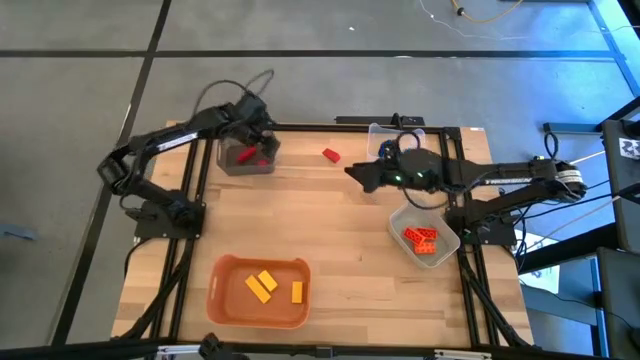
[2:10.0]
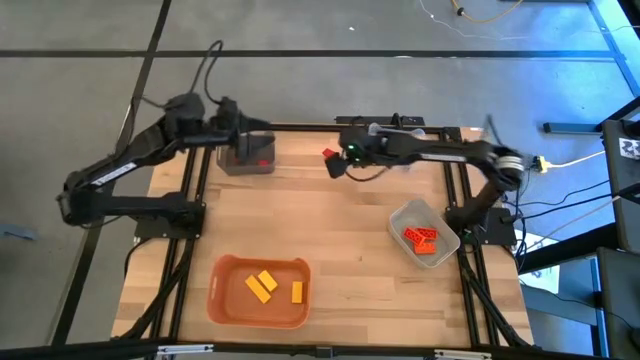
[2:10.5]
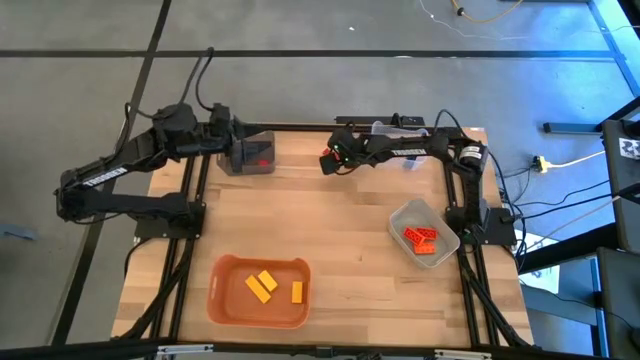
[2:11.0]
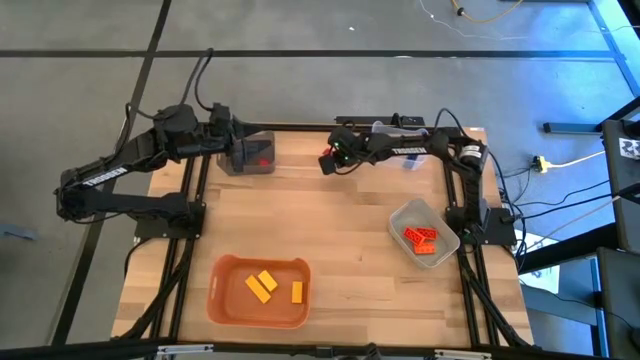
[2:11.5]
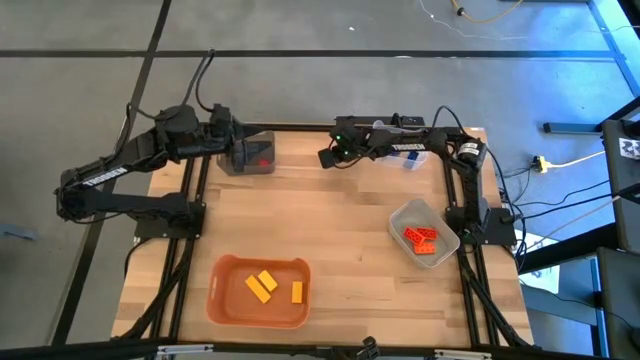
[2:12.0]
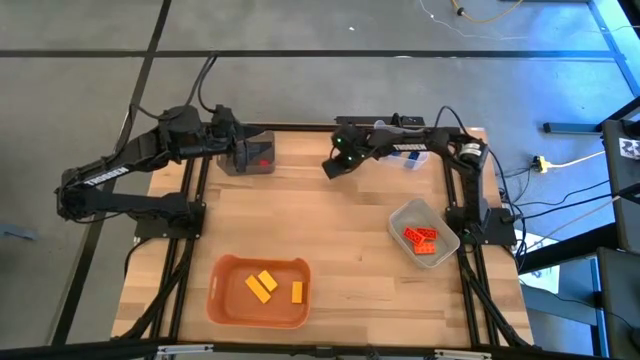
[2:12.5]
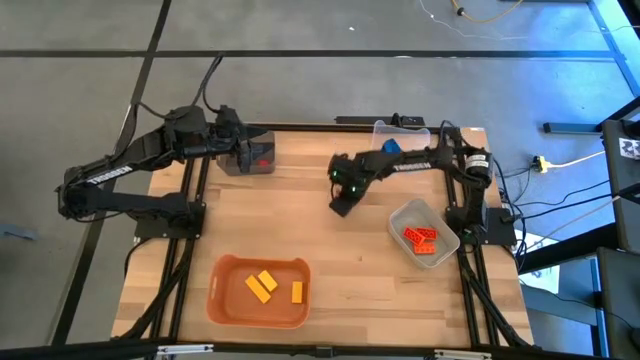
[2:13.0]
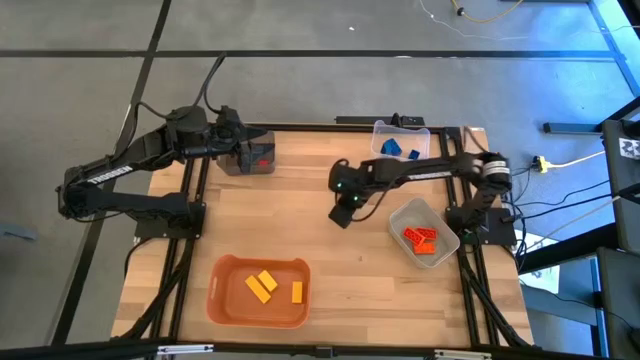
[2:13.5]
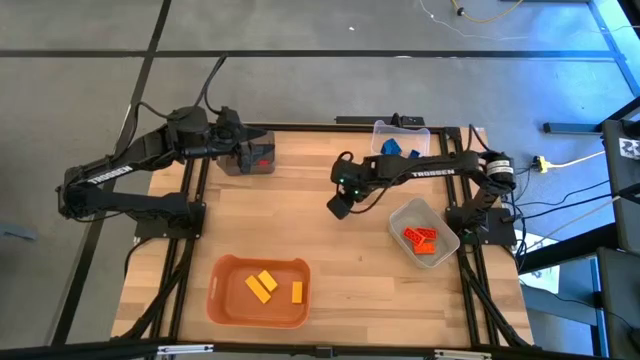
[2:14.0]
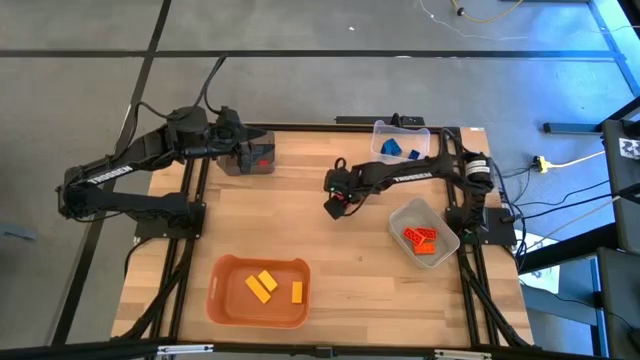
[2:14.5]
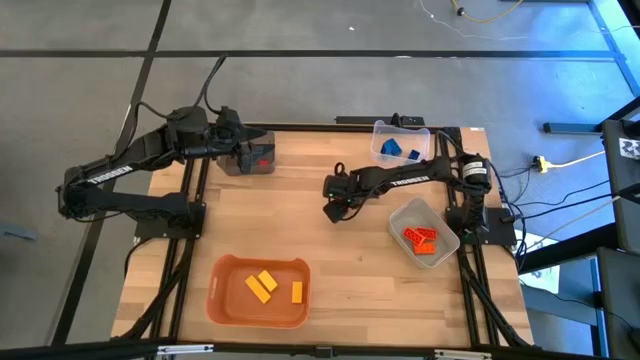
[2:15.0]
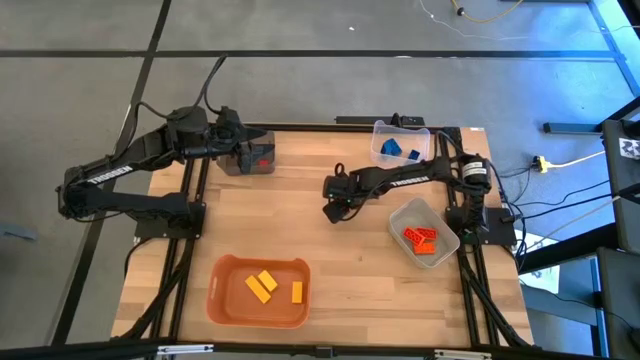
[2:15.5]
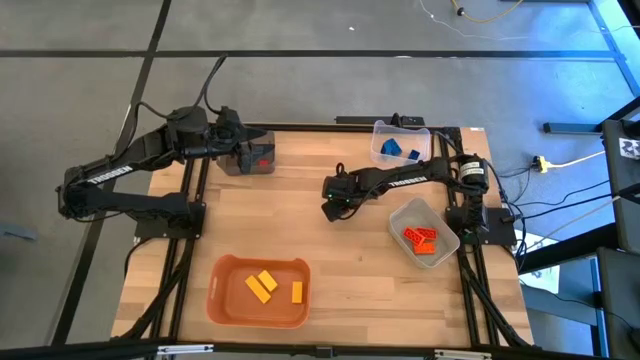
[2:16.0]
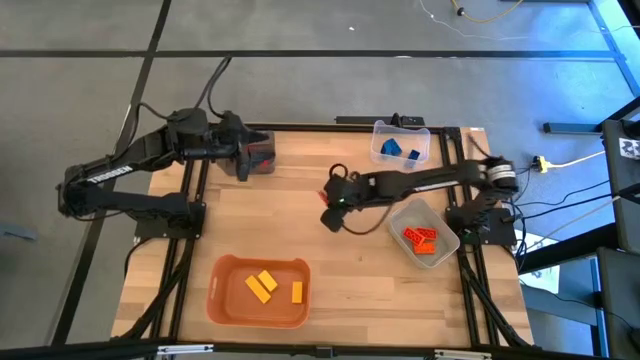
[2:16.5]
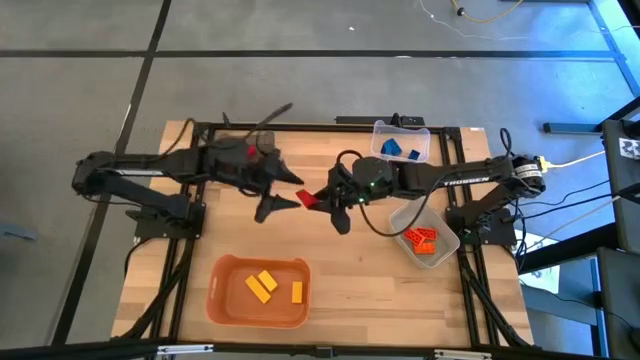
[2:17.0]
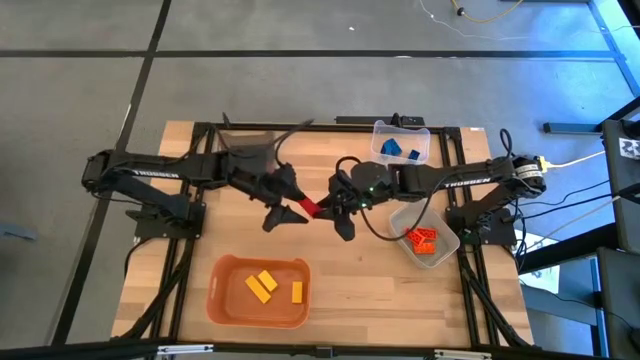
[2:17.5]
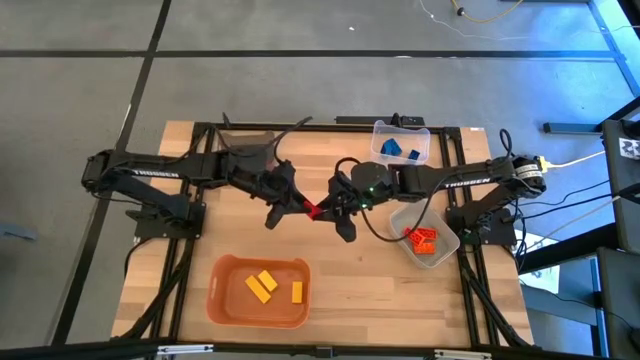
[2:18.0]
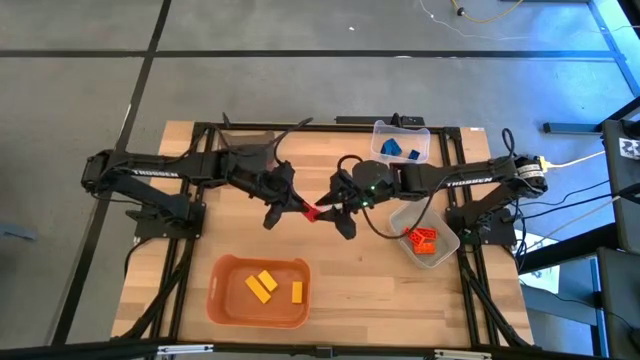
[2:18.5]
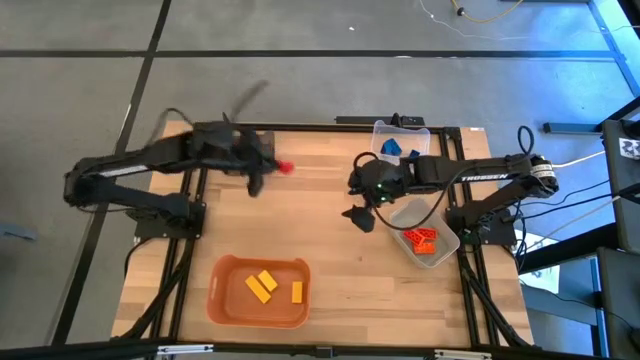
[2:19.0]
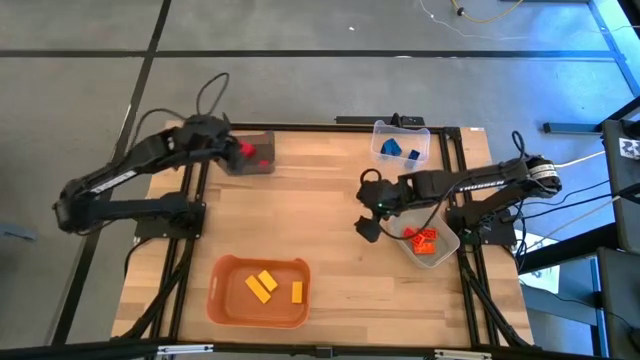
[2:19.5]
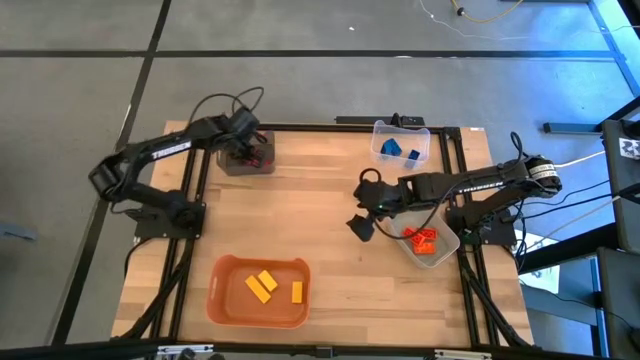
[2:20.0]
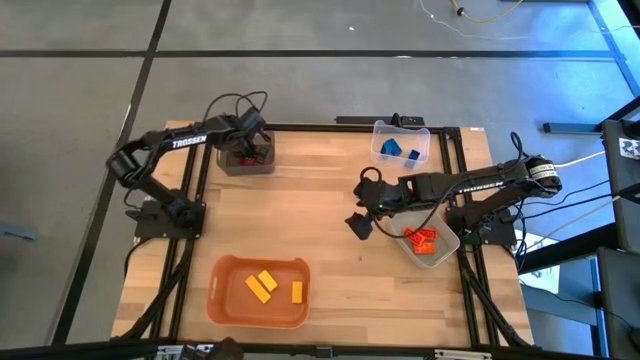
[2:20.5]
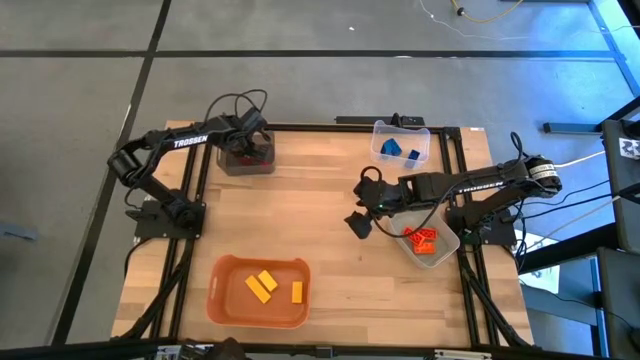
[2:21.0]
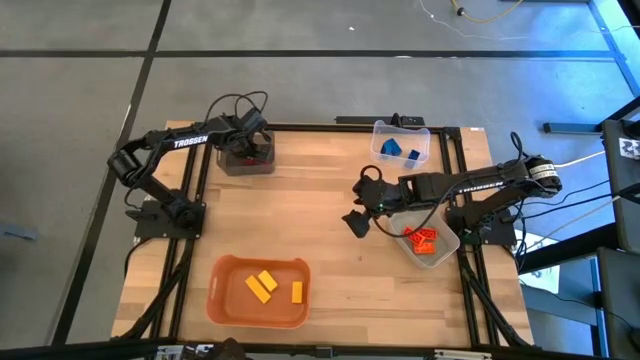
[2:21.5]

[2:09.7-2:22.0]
Task: Sort & place blocks by color
Put the red block into the black bin

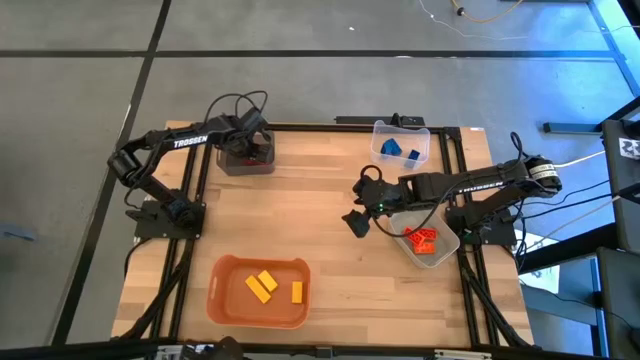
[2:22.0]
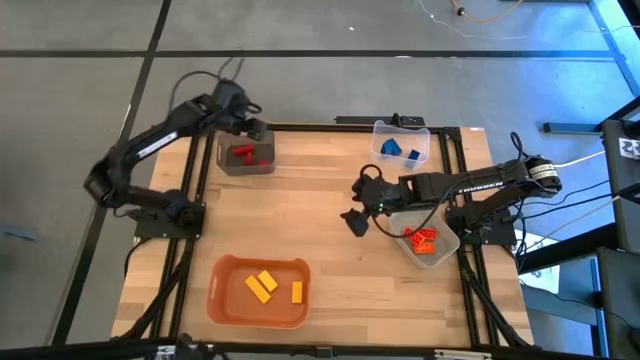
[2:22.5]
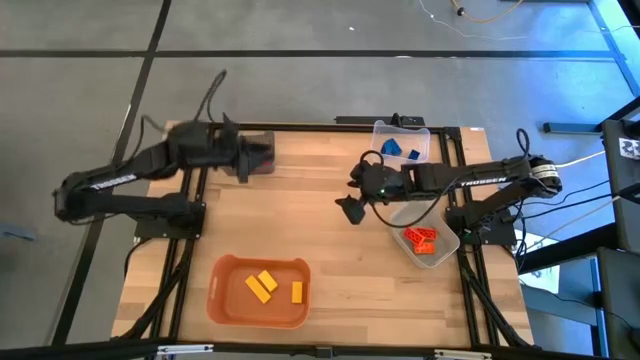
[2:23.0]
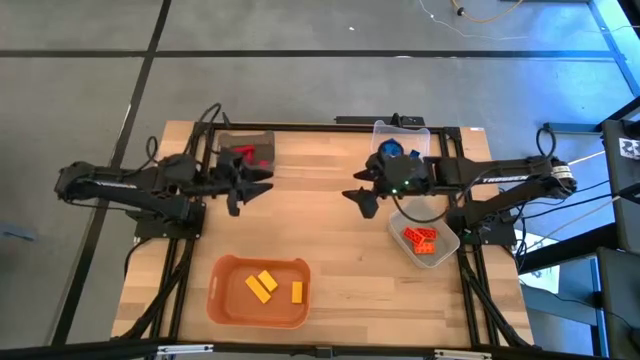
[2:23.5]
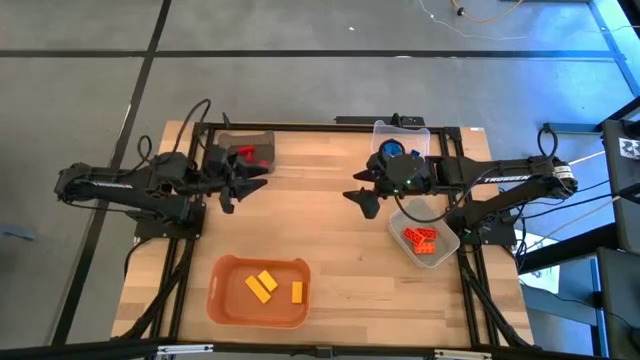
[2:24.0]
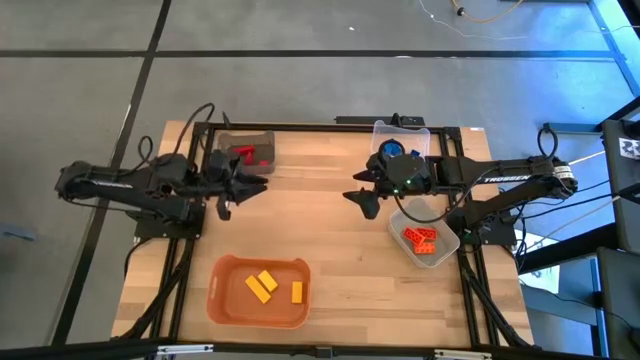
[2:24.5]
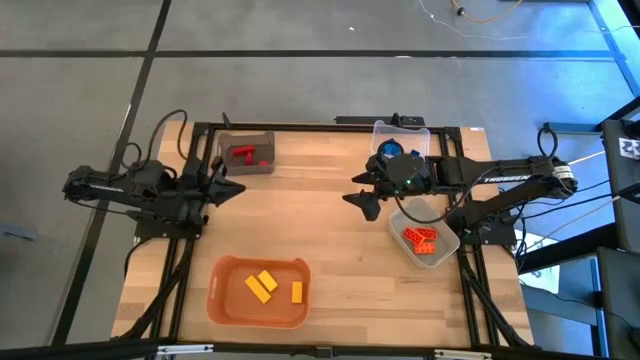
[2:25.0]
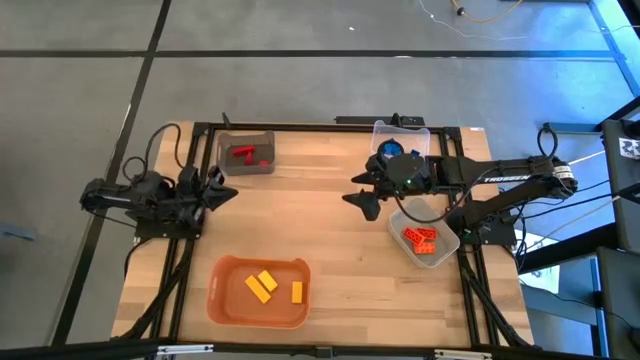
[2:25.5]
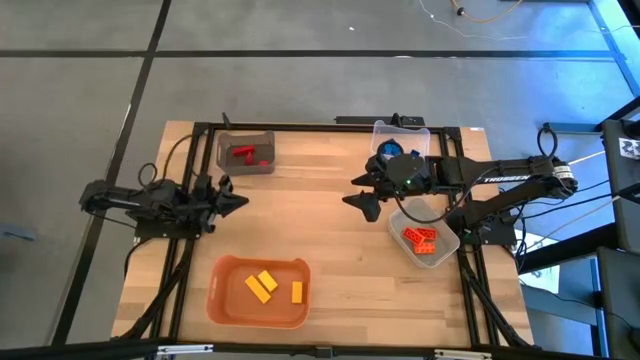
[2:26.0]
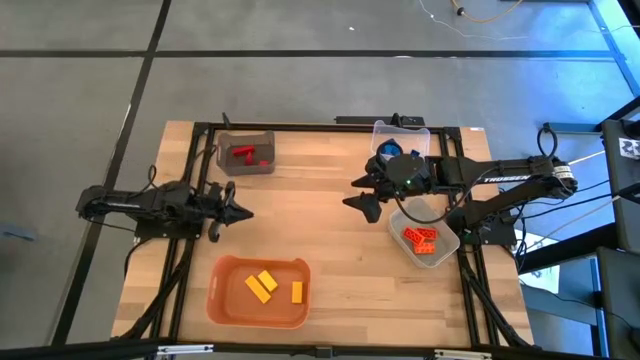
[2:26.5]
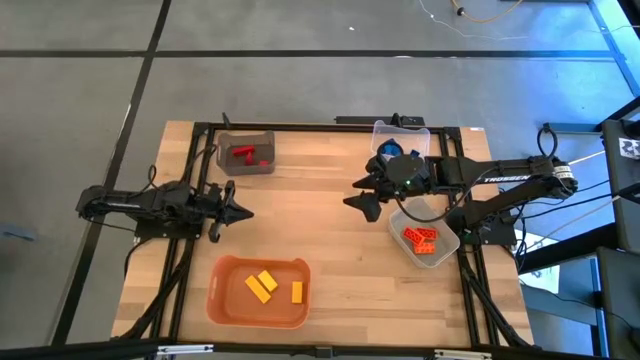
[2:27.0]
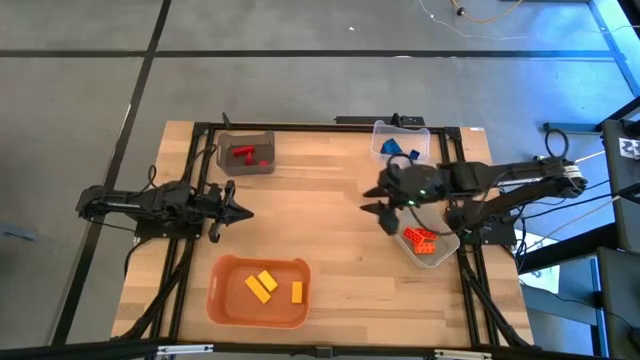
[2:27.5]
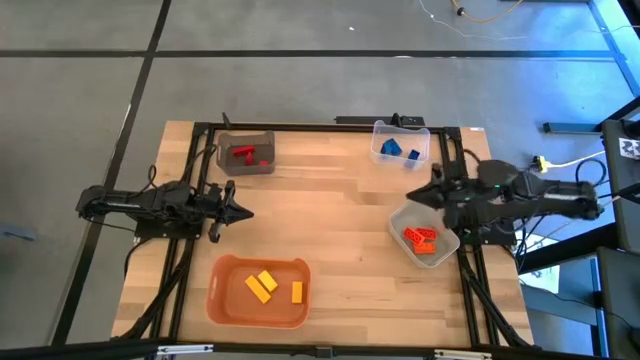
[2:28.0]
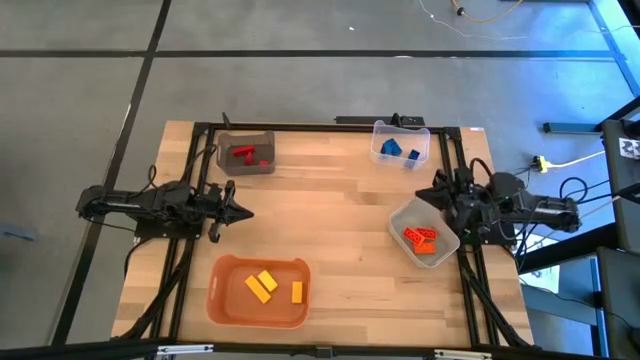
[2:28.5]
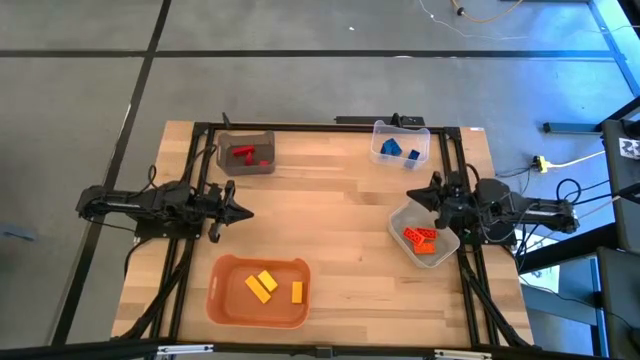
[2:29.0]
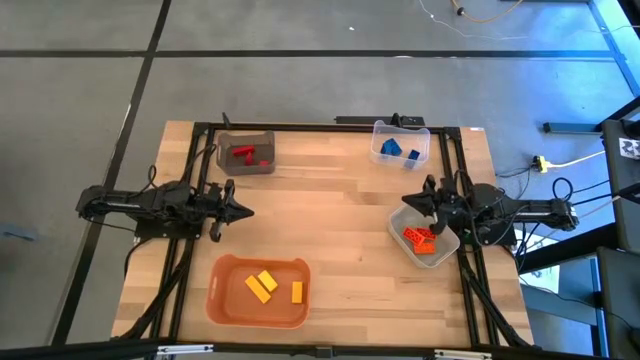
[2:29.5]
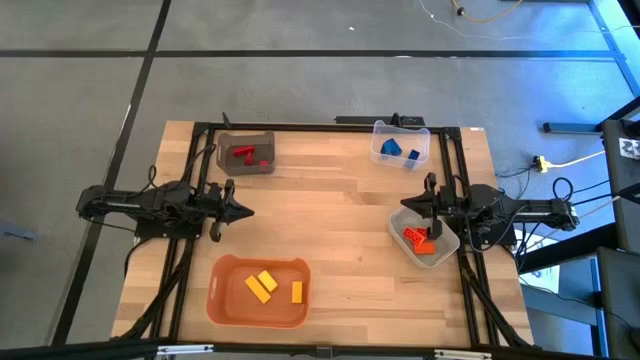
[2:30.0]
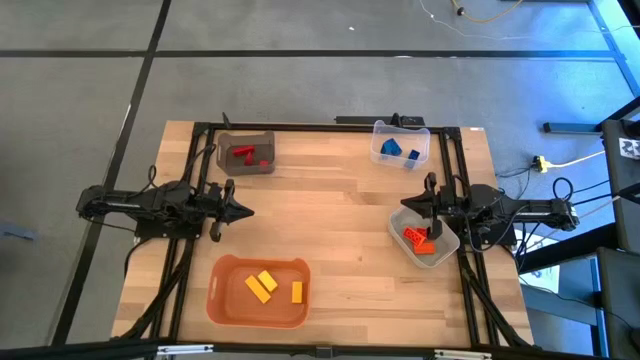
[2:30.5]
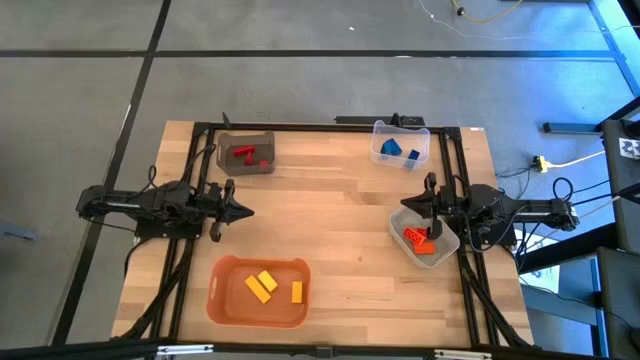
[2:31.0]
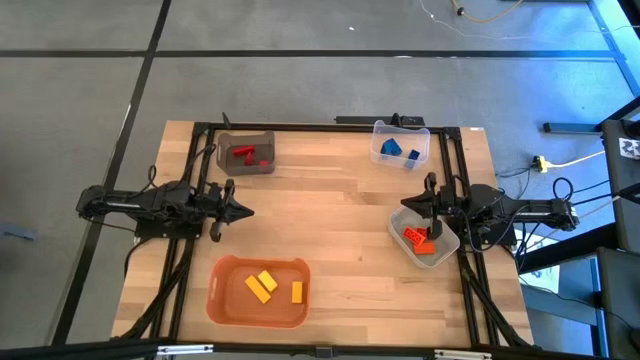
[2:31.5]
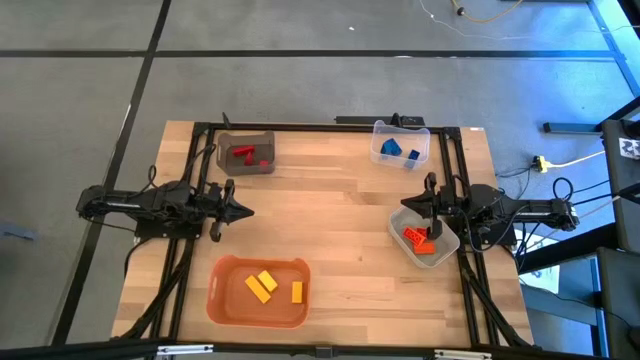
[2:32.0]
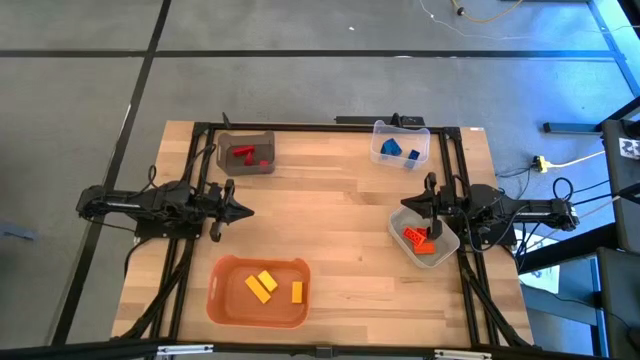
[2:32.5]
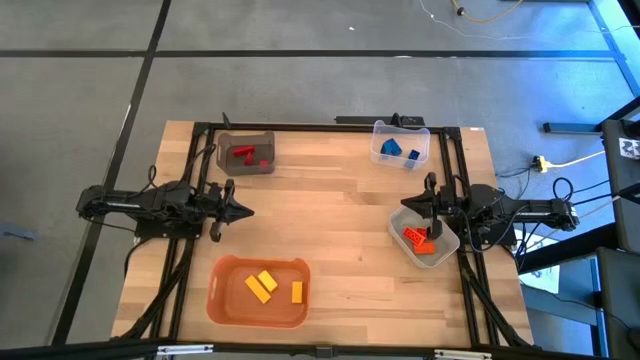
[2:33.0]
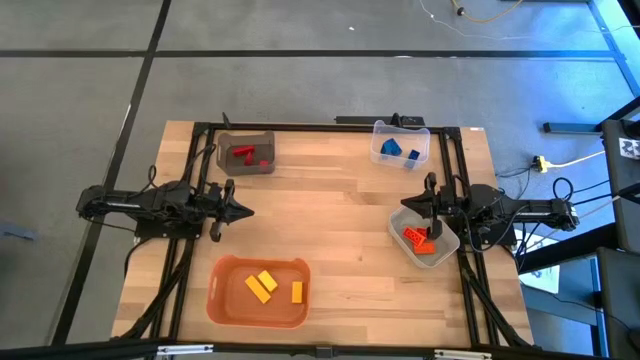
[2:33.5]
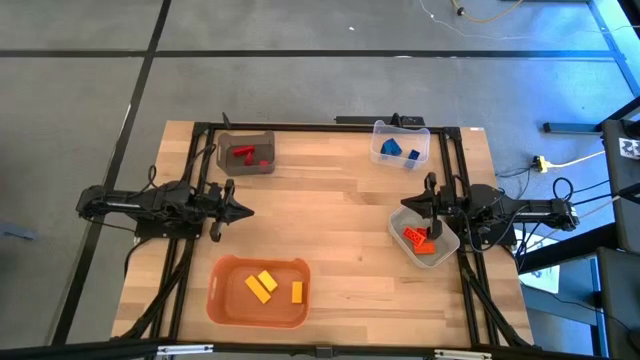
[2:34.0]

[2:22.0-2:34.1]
Return to Home Position
